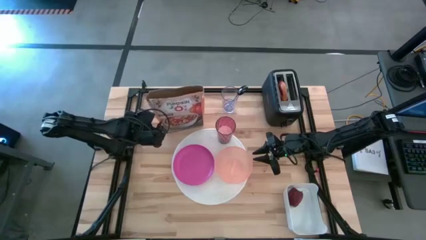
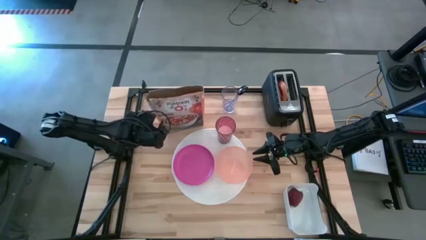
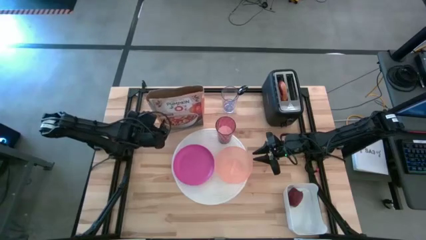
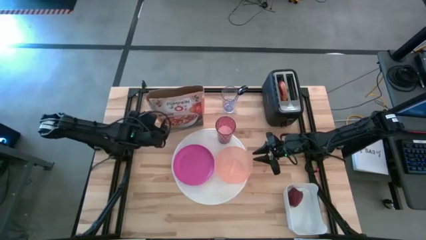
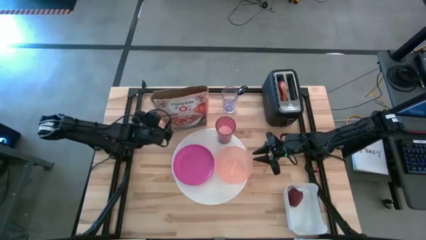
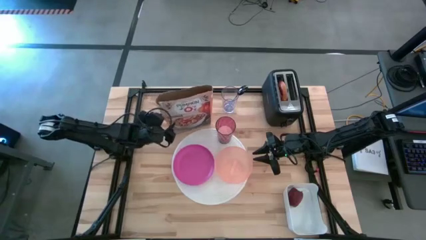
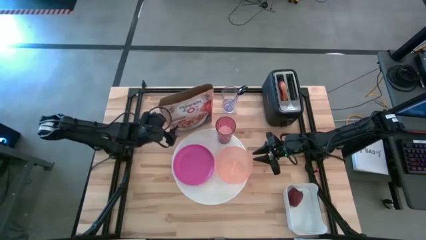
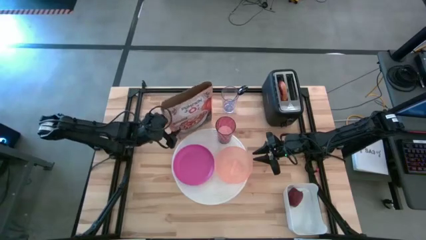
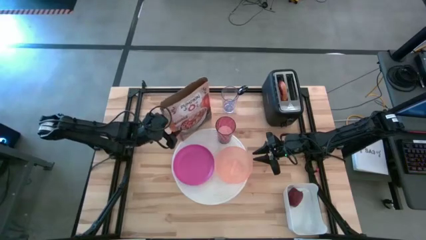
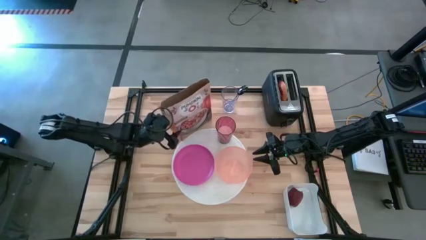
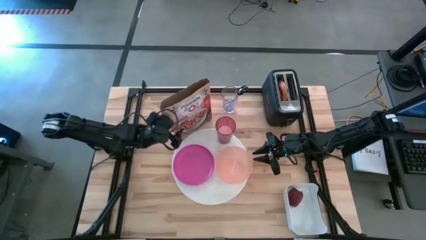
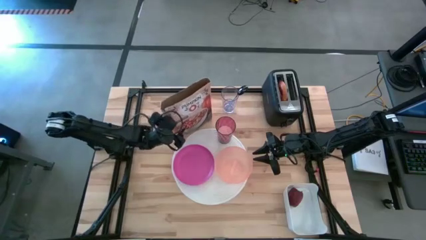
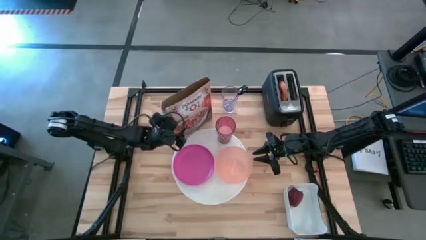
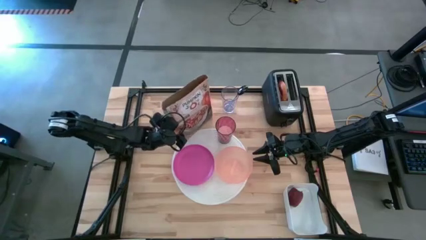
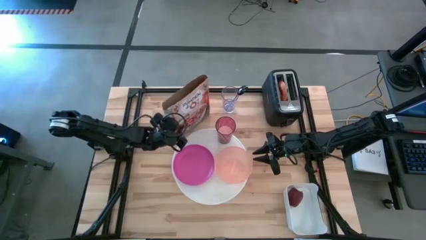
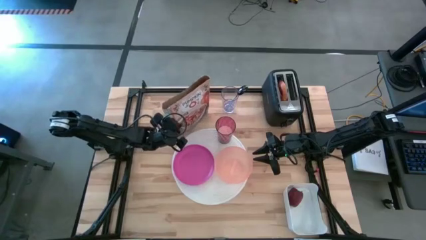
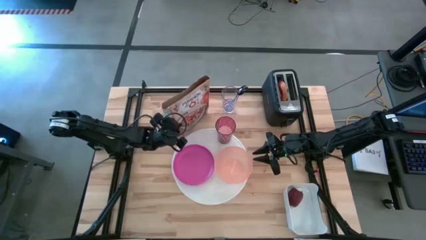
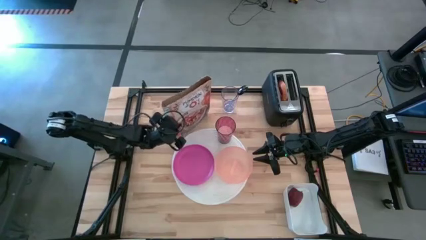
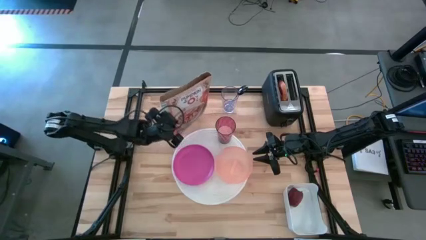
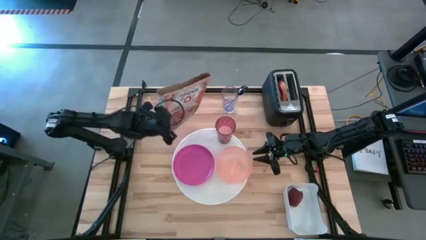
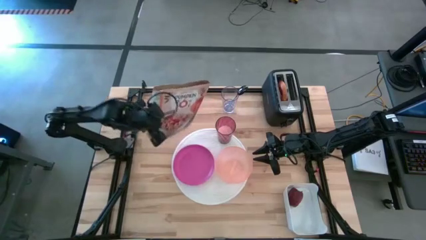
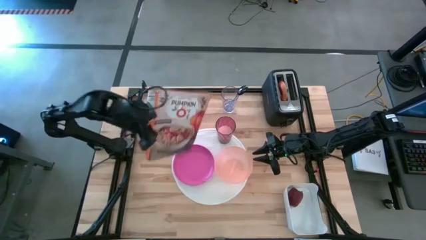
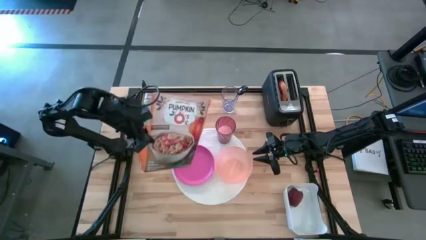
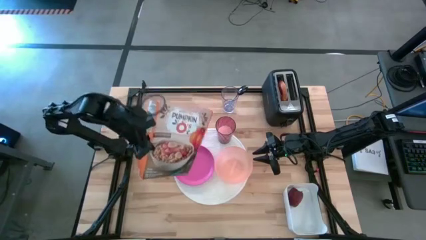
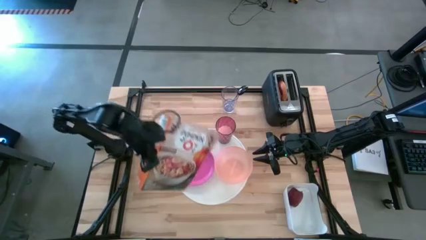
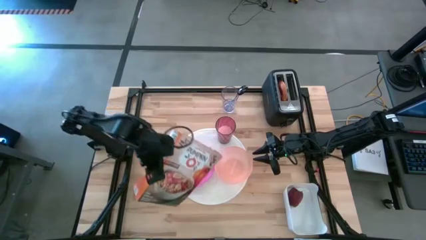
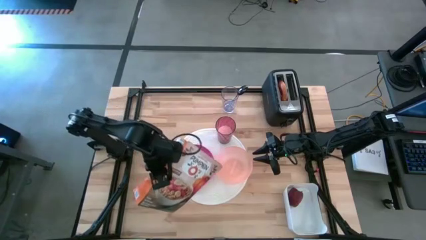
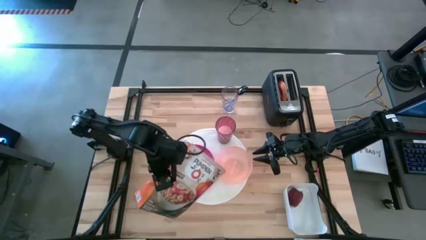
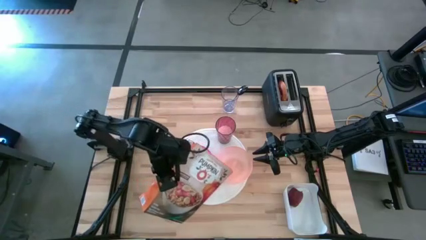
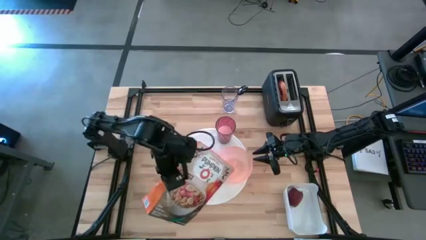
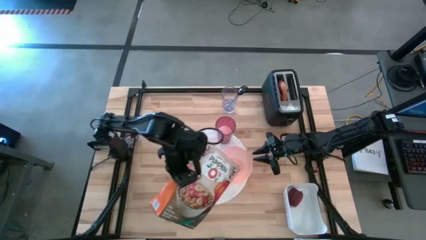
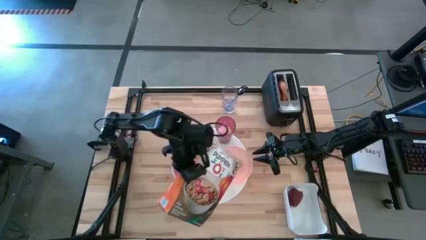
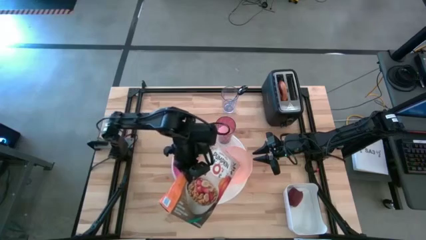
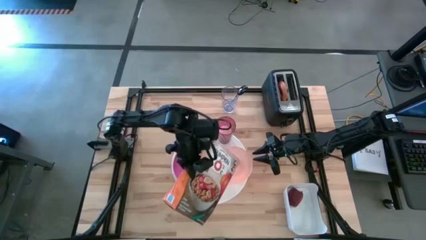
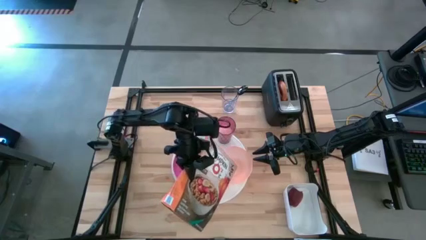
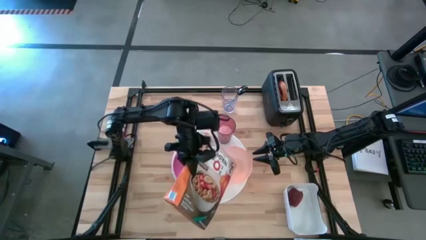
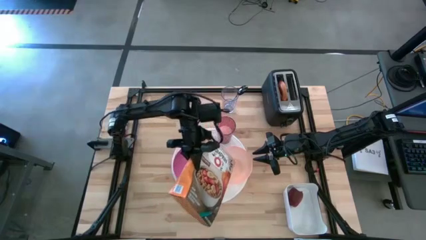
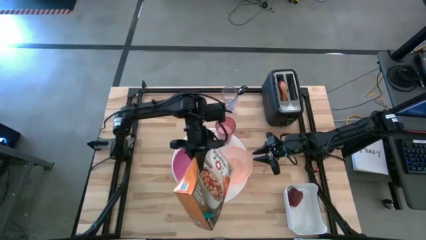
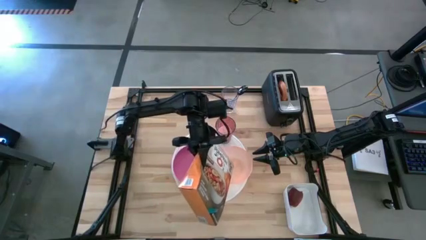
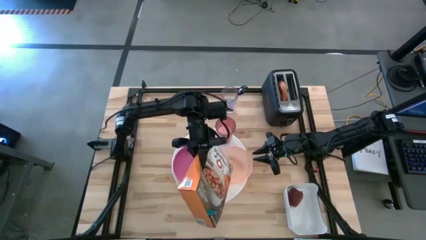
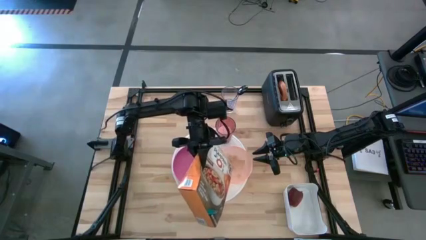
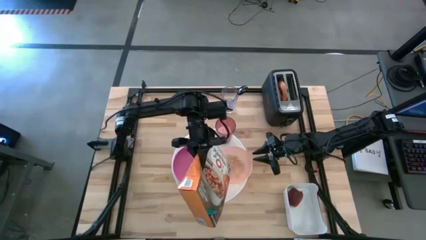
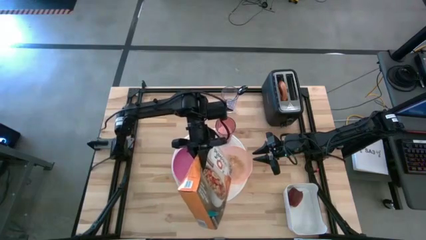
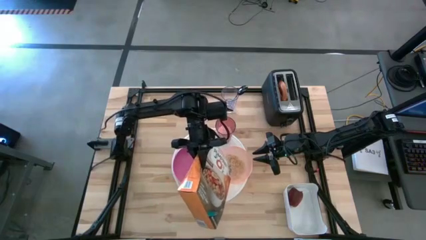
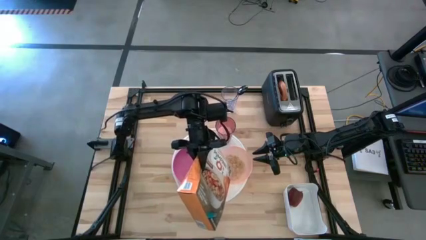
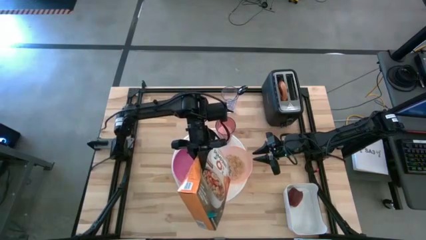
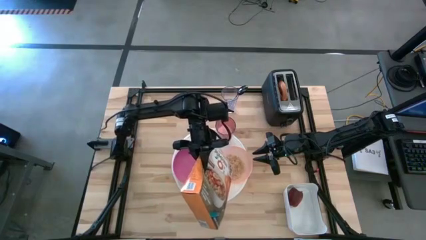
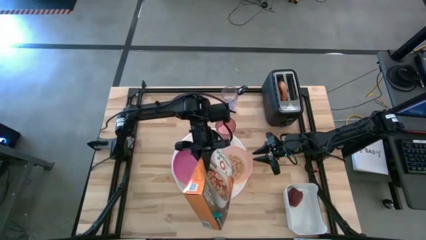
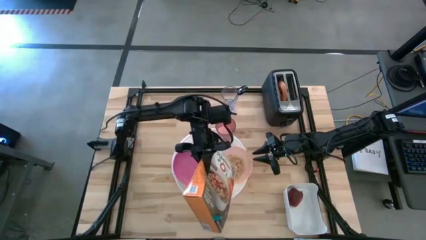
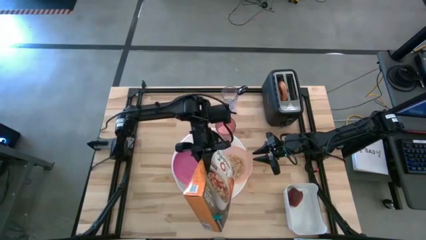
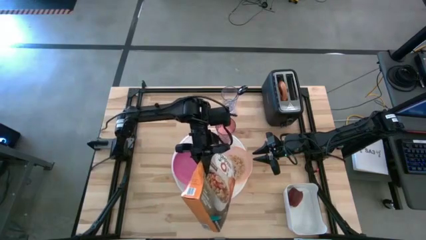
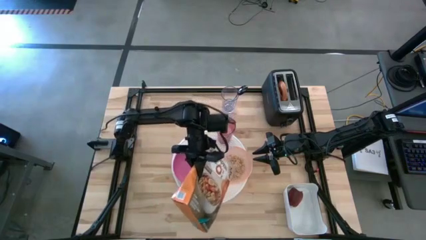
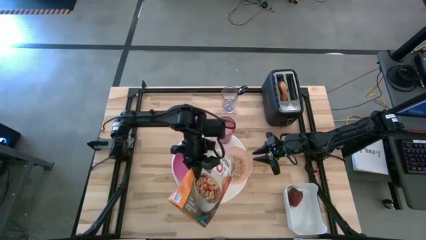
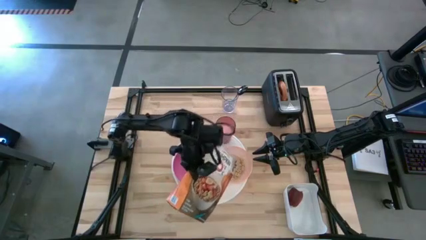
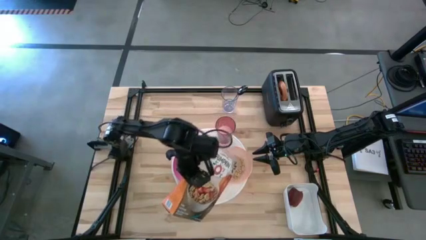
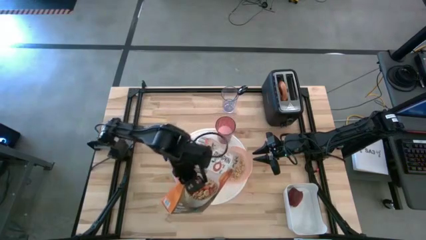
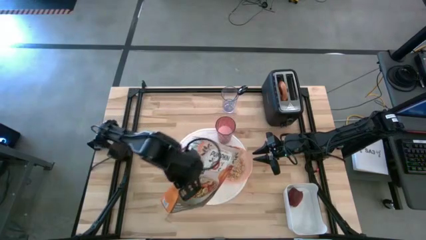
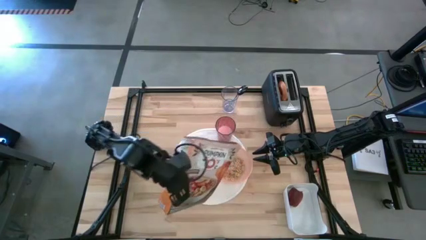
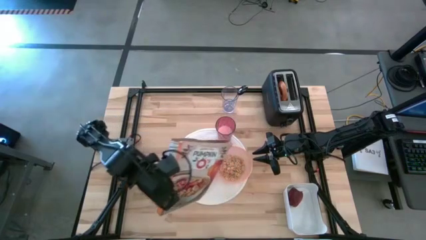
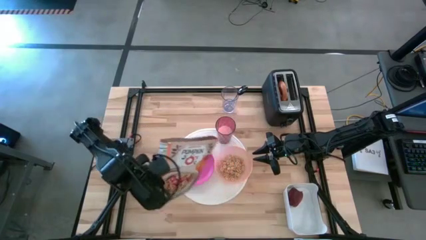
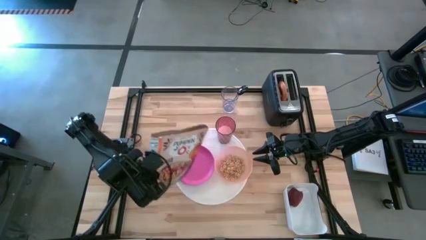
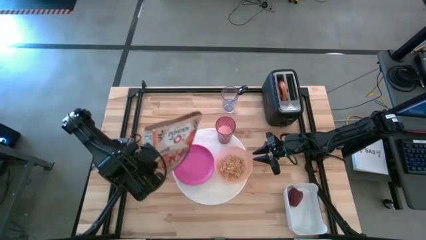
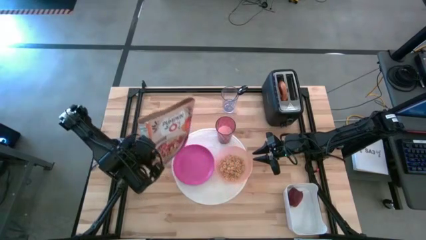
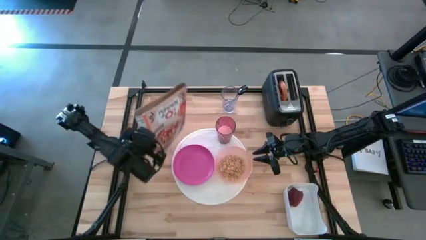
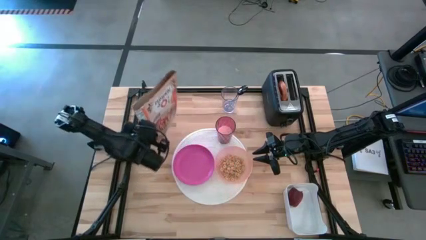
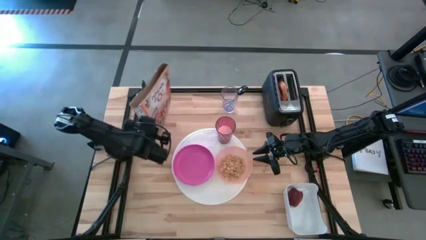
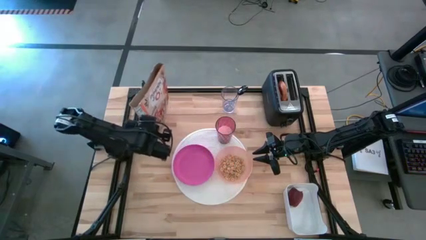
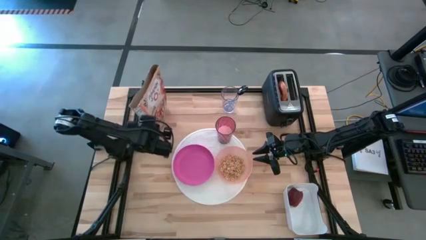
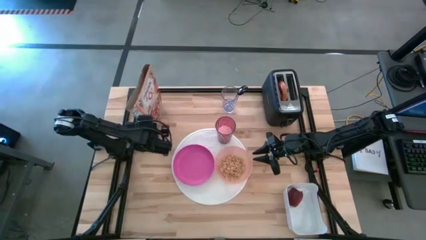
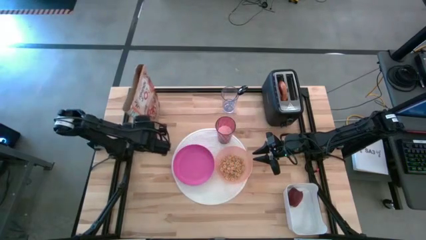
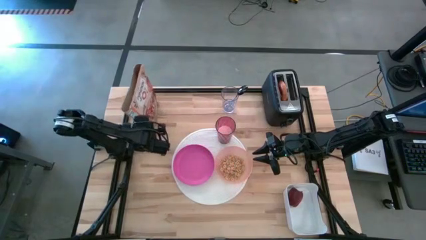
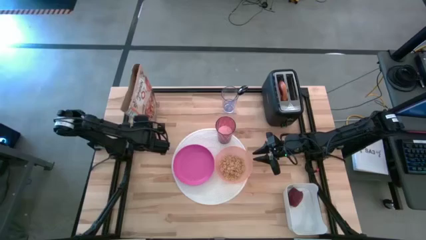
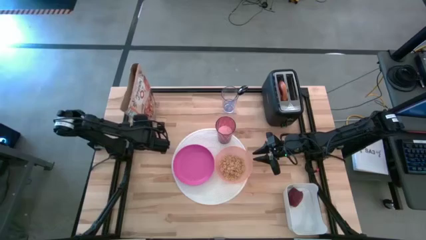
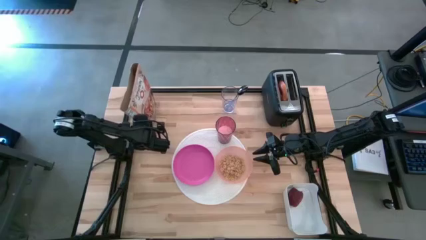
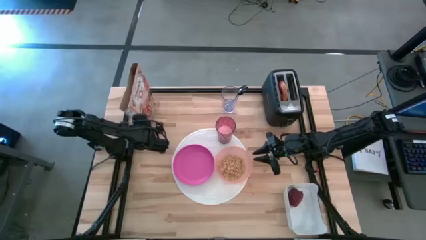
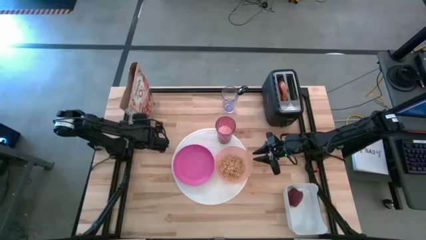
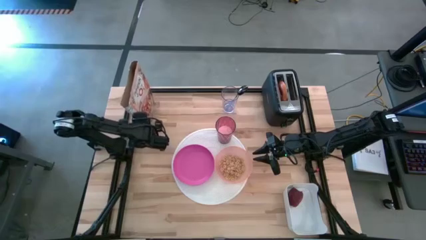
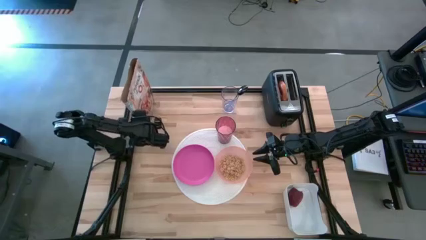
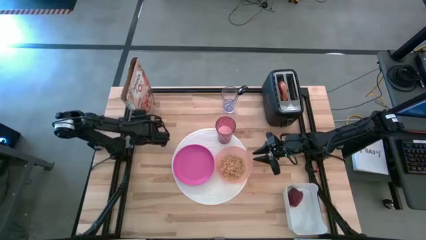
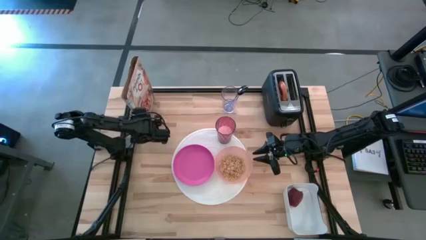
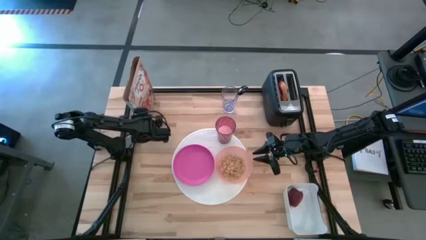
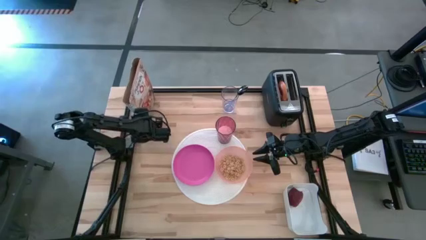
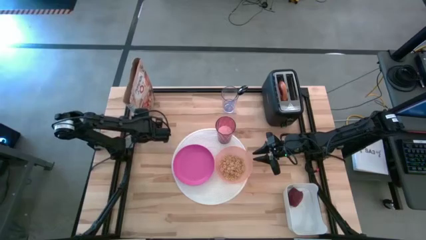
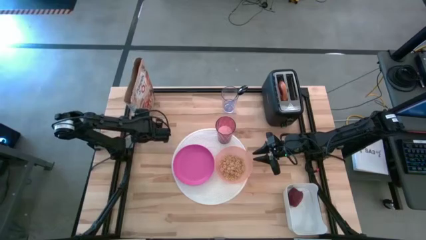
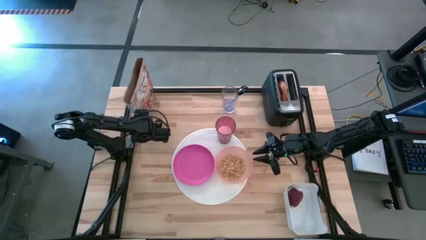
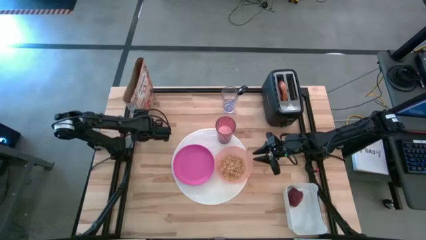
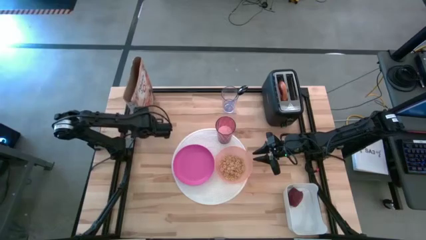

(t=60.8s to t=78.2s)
Task: Arrange a breakfast setting
Pour the cereal from the orange cereal box into the orange bowl on the white mat
